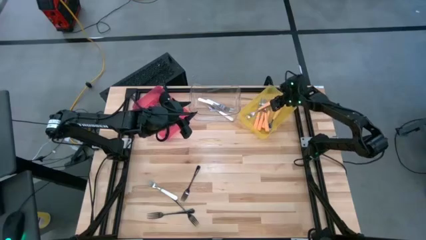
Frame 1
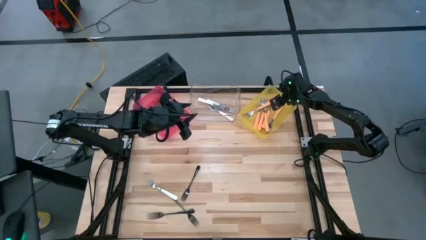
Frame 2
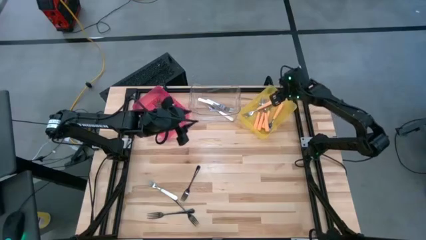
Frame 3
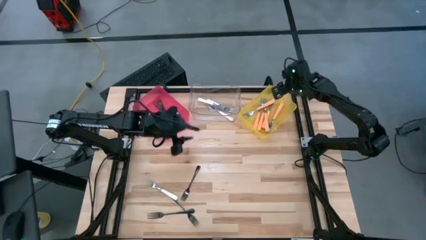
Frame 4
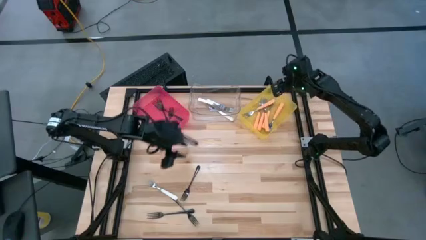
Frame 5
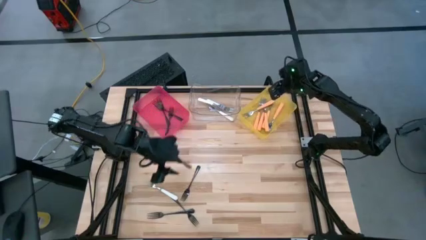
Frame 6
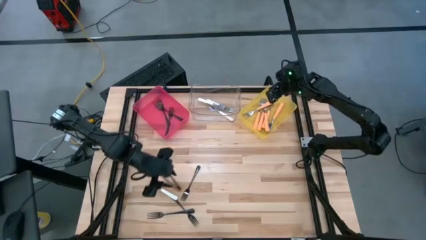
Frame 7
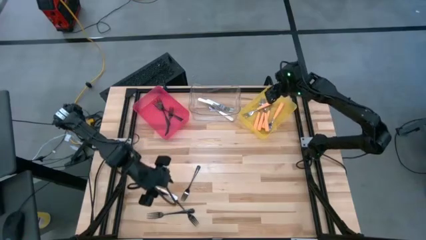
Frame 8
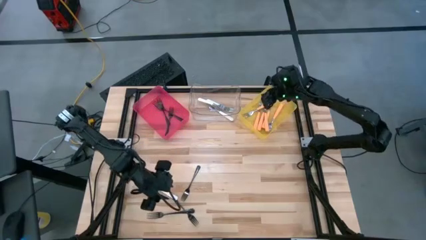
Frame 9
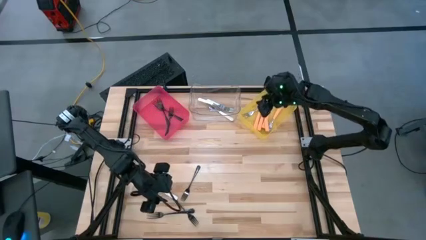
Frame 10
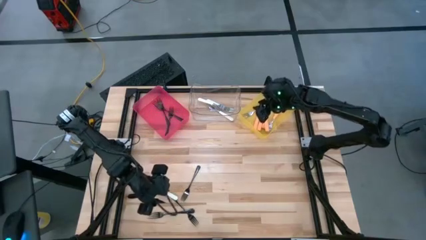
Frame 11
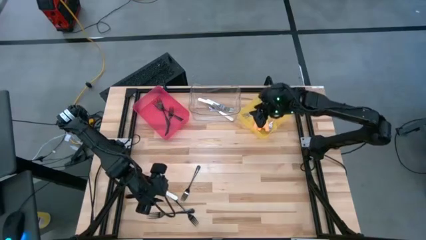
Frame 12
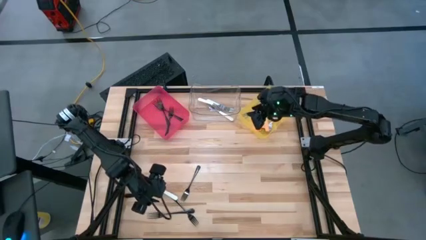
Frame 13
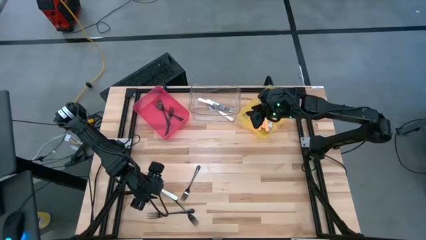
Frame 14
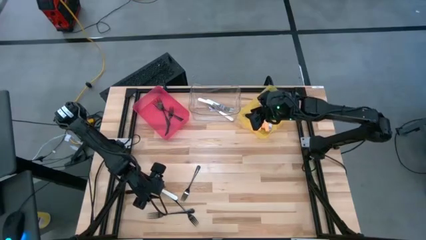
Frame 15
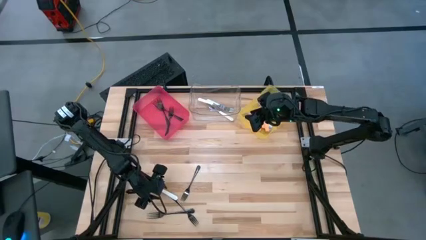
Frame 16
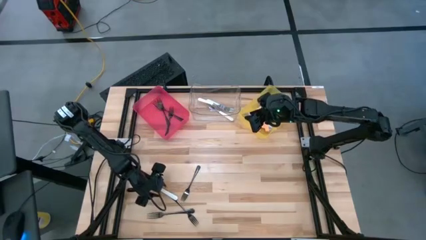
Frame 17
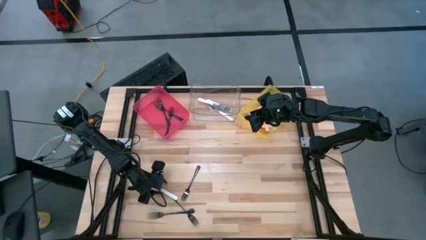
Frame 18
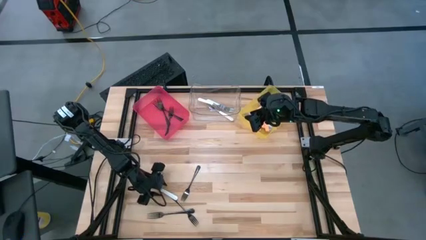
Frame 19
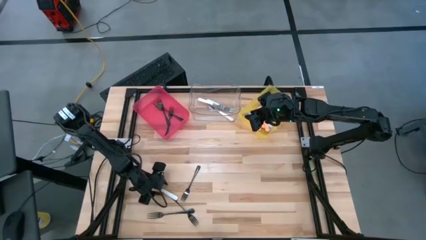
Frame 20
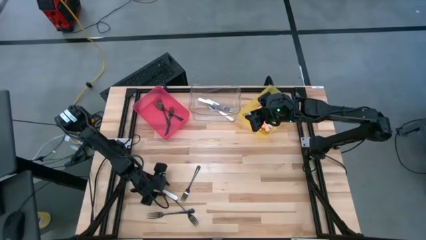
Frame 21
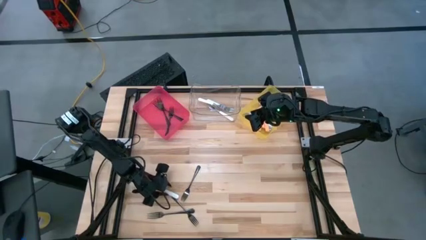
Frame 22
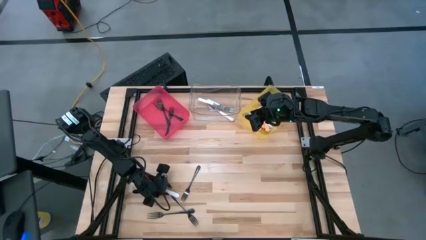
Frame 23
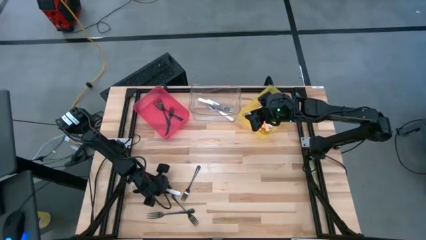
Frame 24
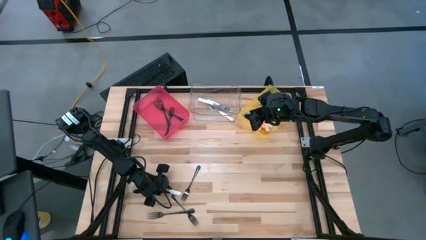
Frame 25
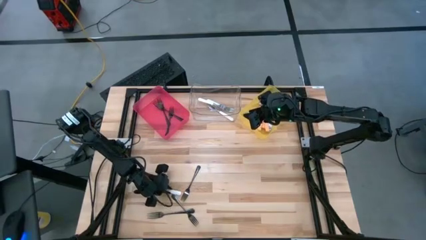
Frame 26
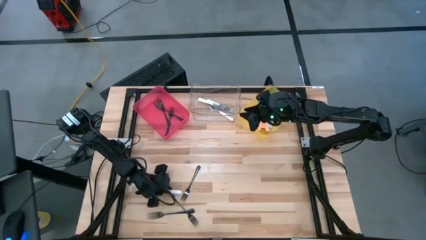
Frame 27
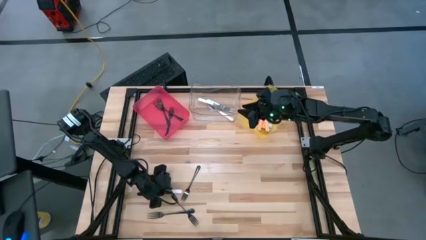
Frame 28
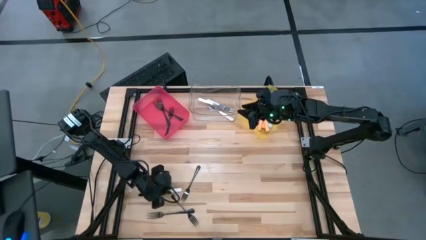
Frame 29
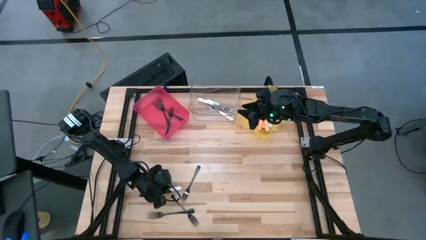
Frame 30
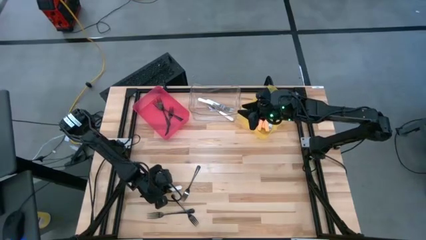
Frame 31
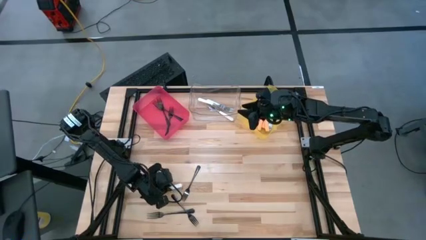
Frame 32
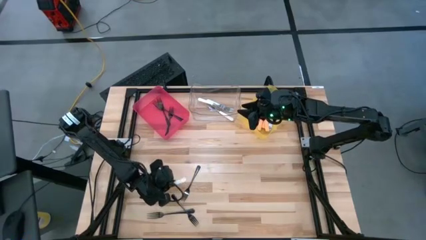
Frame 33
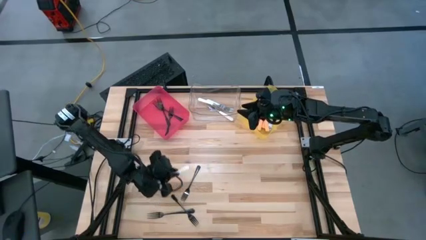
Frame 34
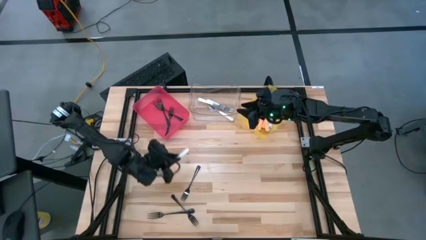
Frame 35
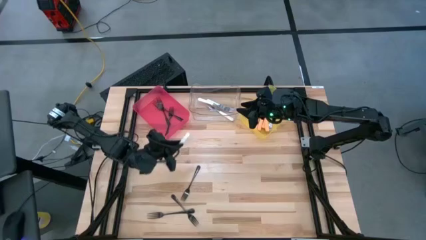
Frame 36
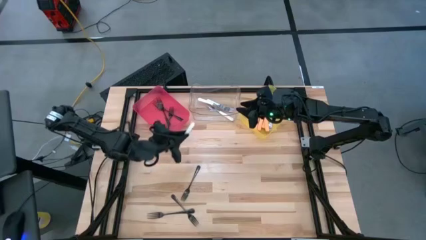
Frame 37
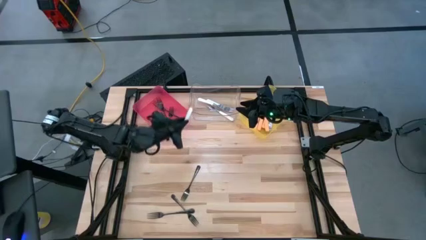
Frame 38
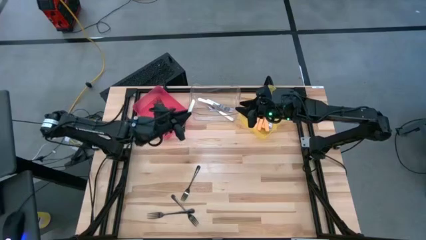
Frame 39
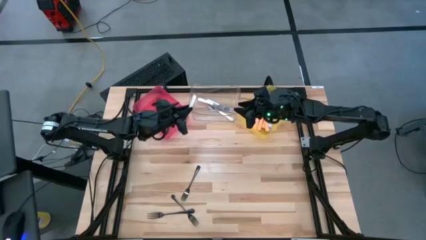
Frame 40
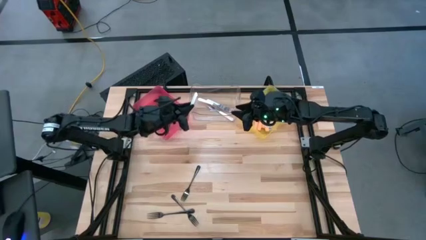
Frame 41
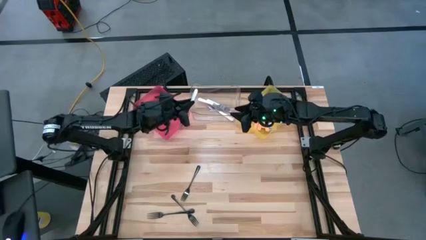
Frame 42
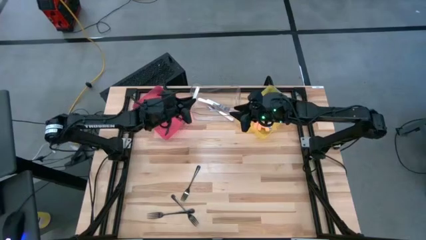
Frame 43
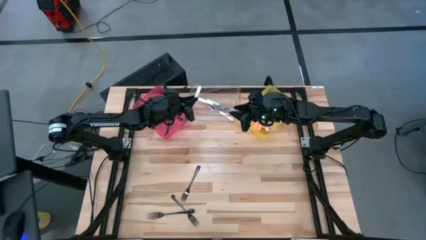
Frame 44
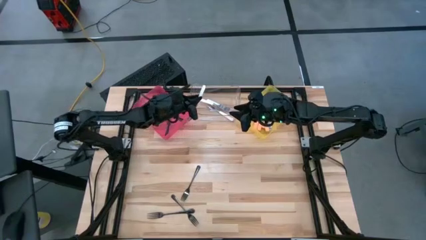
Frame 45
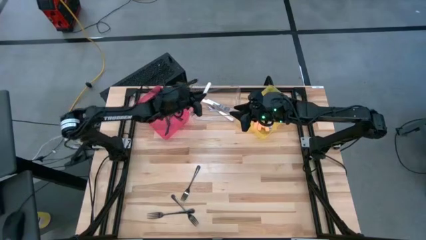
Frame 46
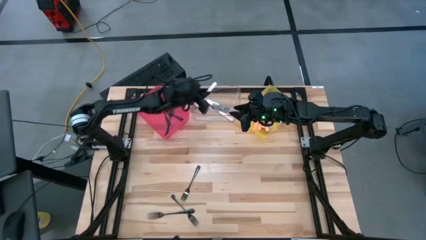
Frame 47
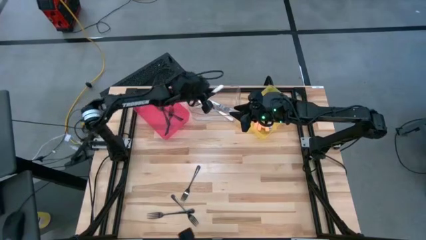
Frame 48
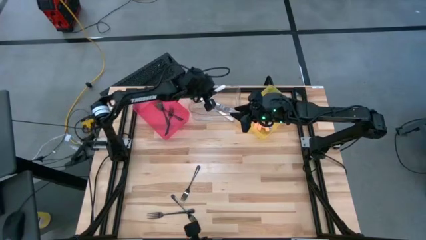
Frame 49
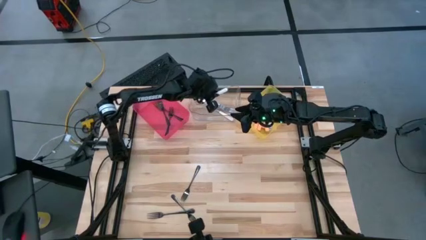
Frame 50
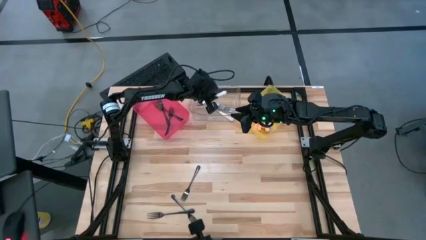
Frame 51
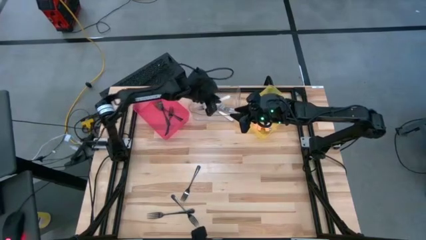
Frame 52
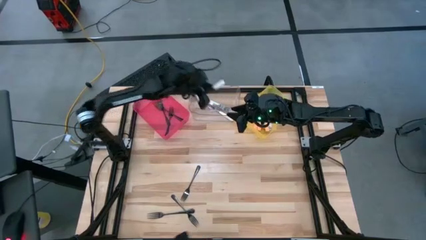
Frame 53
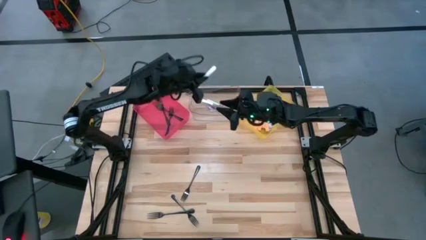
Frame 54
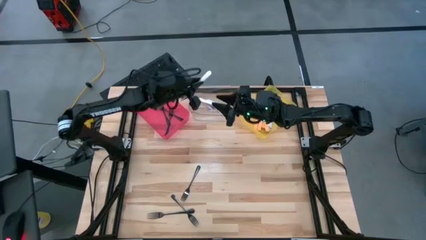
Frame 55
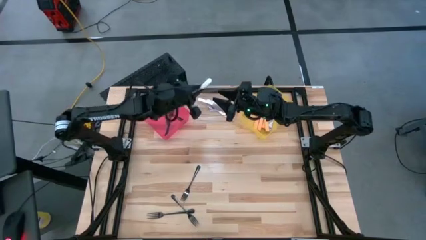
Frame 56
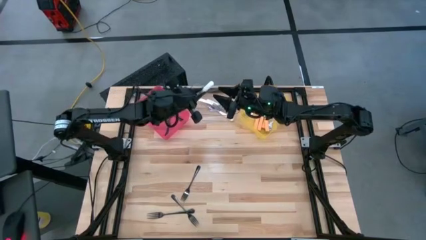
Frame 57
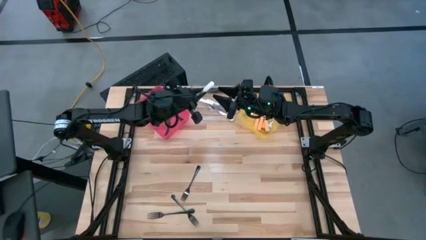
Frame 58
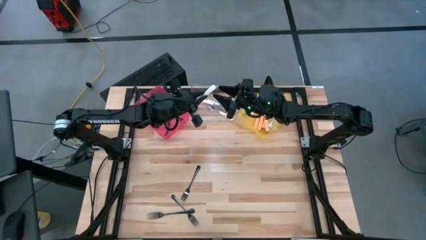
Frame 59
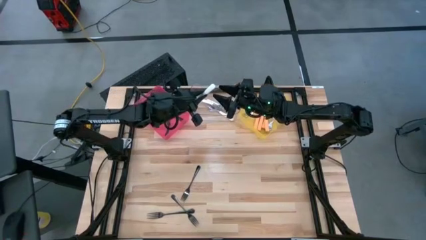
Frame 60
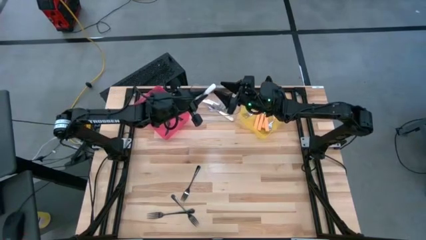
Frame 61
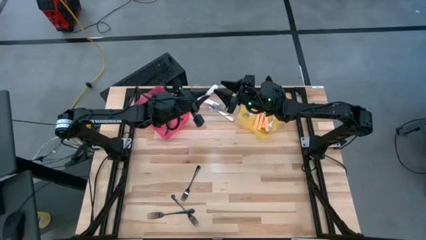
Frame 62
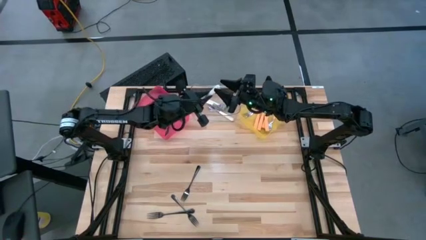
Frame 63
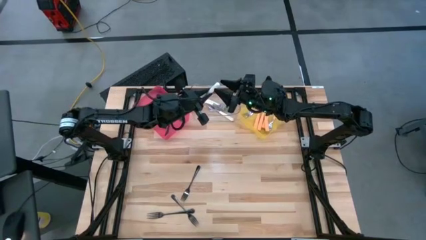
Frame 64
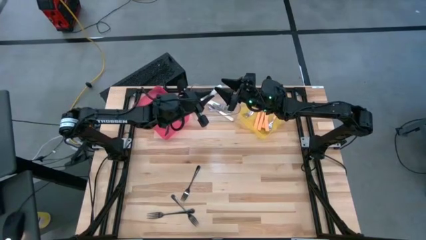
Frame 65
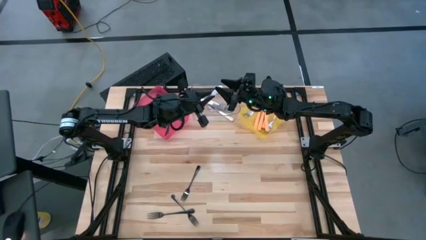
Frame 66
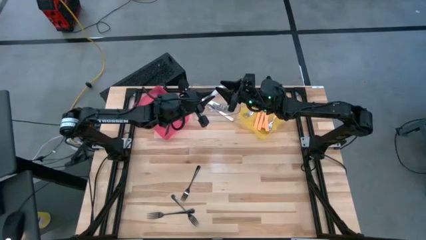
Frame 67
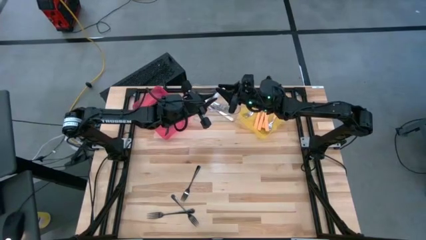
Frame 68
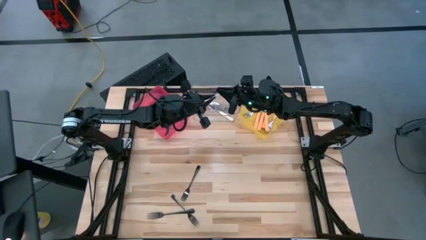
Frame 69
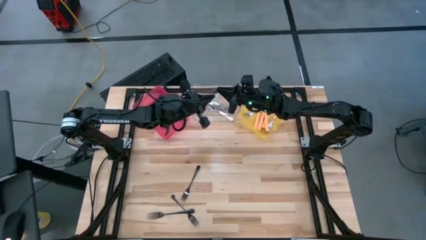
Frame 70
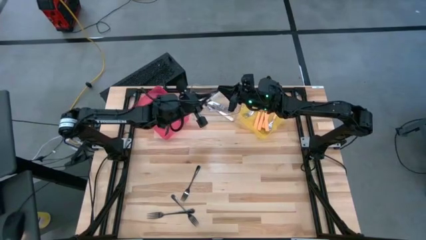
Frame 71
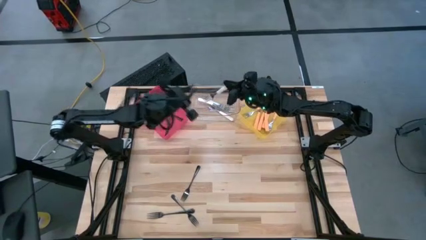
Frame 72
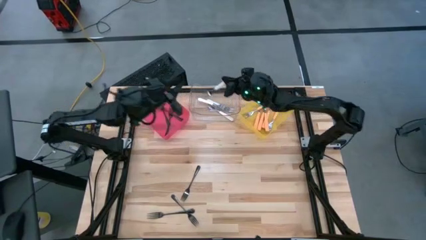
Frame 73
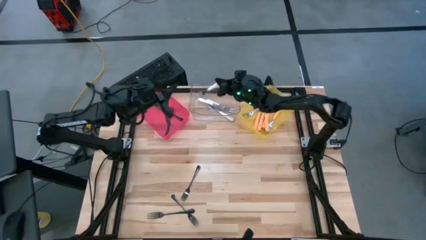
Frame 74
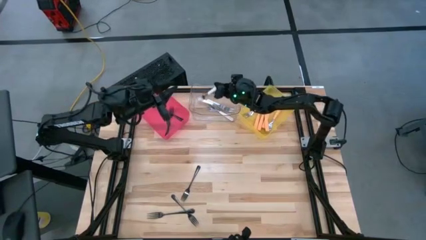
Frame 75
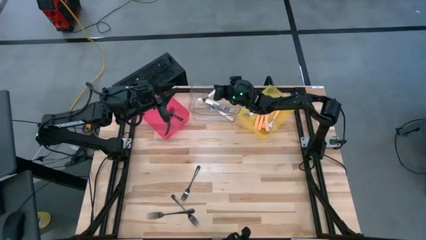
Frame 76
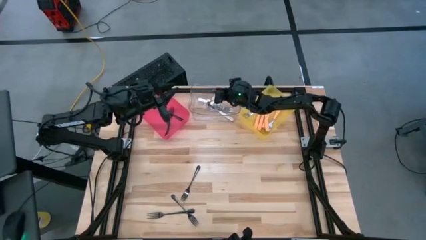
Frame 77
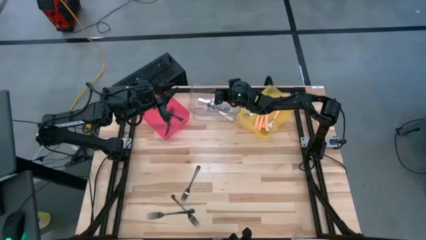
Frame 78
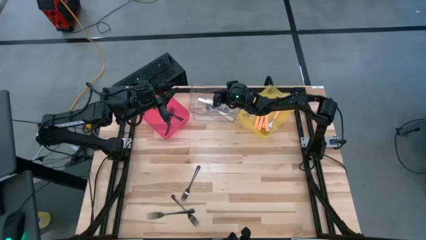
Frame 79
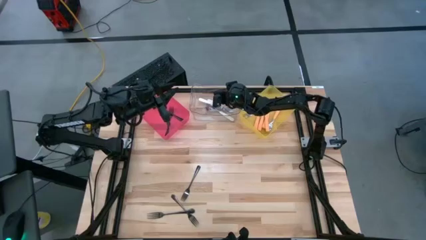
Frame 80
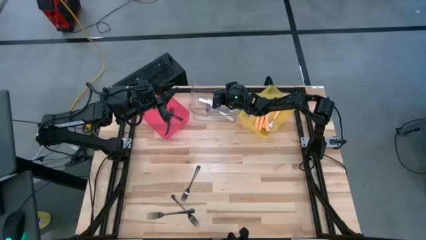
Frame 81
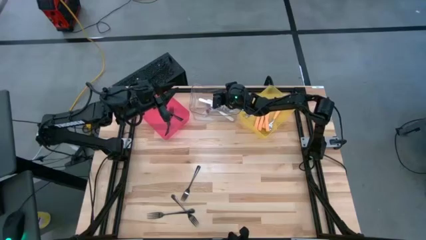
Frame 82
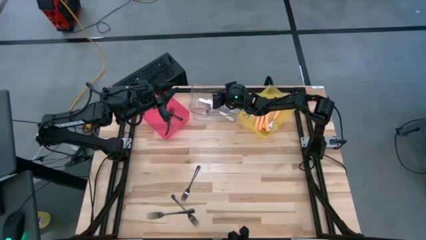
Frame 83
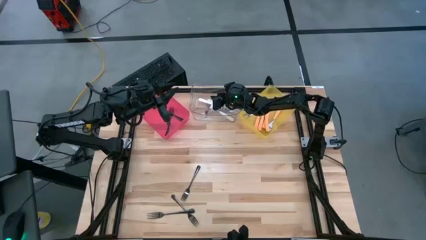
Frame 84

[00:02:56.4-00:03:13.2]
Task: Sort silverware by color (type)
Put the white fork into the transparent bin
